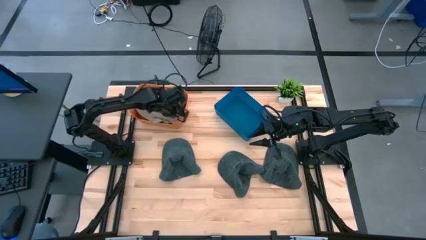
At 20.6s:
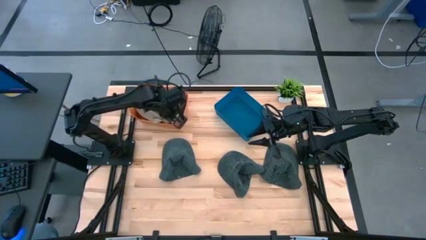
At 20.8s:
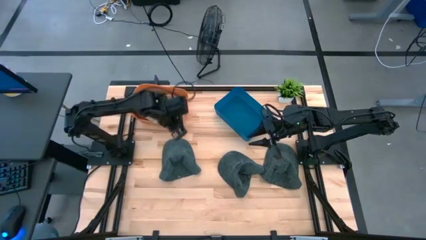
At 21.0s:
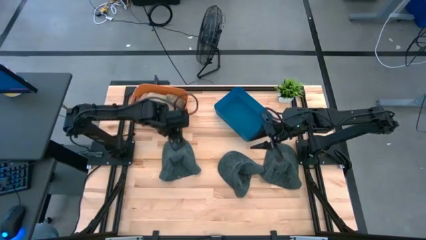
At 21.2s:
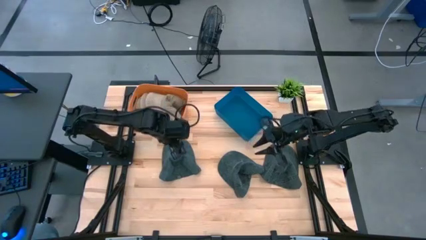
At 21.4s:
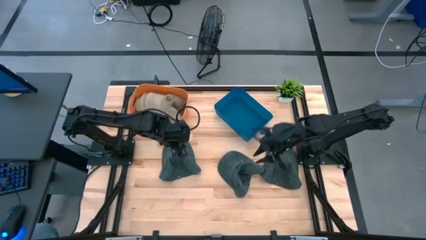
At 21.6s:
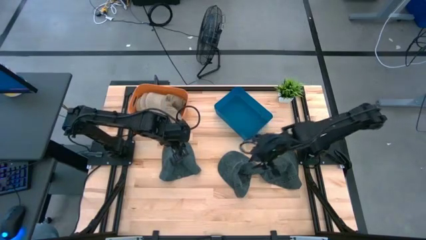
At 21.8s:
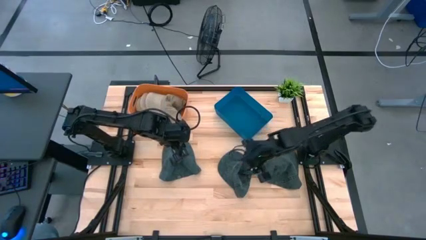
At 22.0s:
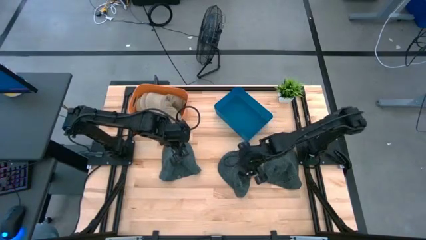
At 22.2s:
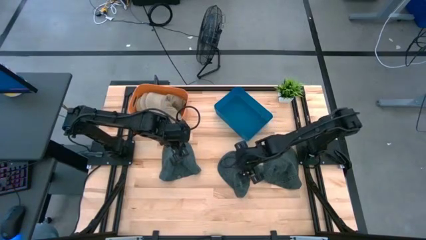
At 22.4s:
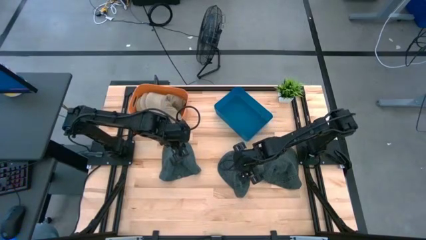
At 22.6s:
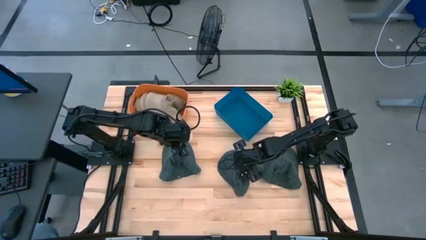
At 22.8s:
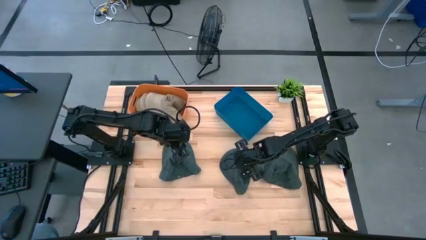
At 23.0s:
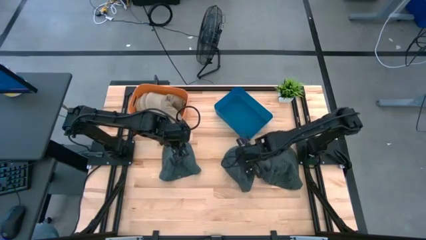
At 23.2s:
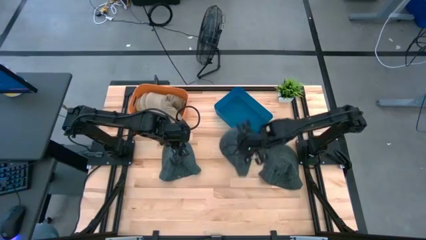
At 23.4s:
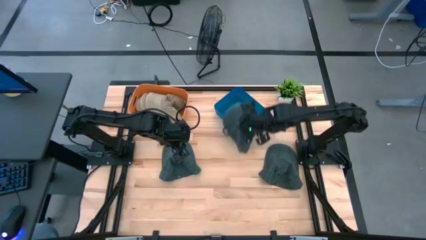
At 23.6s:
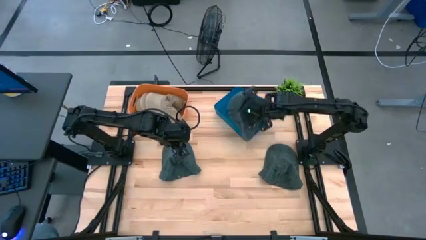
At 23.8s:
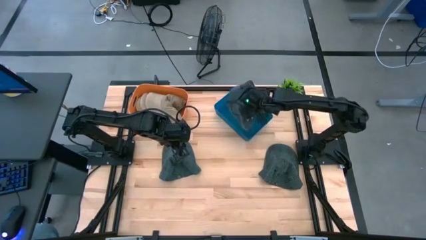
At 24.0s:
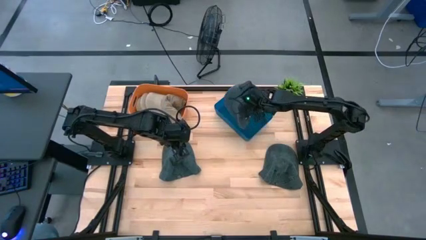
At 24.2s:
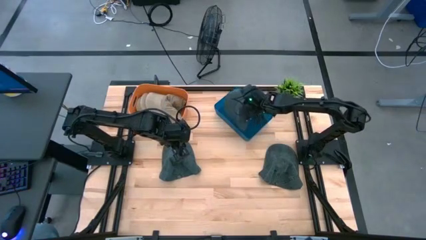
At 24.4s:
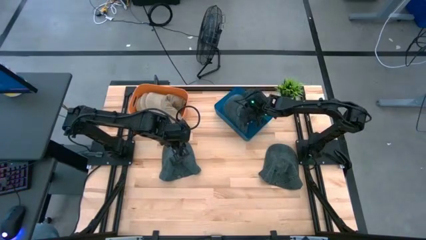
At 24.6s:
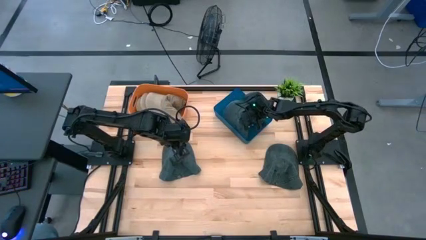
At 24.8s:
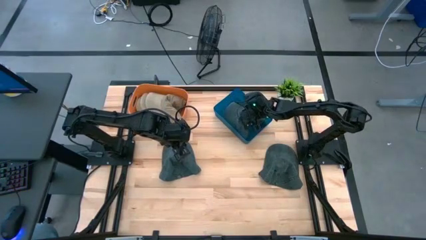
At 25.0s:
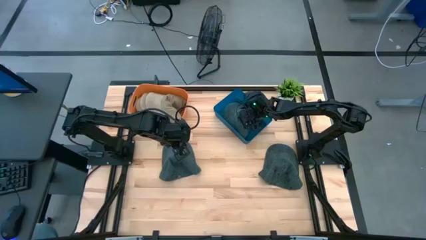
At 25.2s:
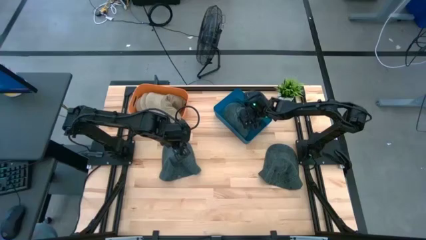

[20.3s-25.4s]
Task: Pick & Place hat
Put the middle gray cap into the blue bin

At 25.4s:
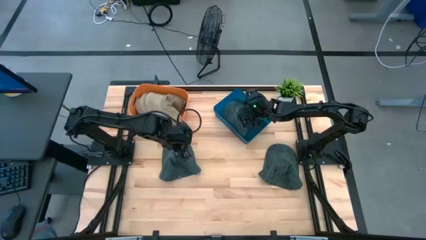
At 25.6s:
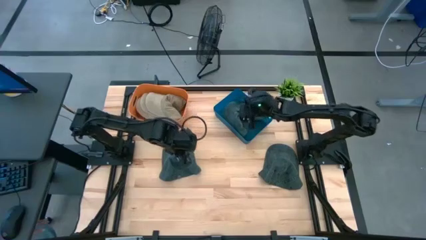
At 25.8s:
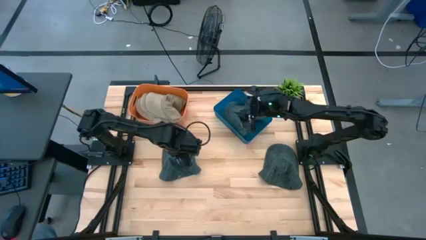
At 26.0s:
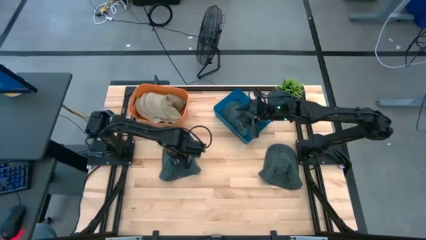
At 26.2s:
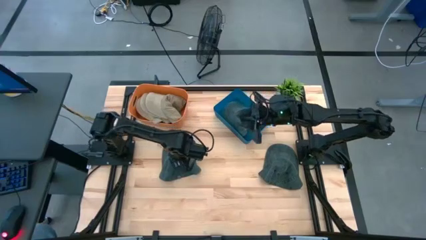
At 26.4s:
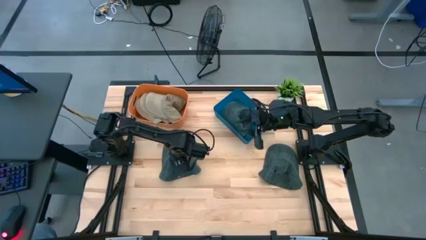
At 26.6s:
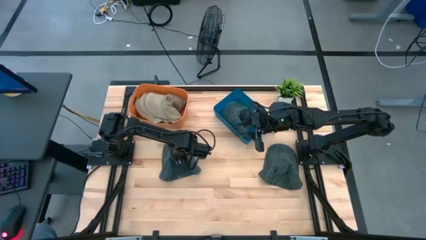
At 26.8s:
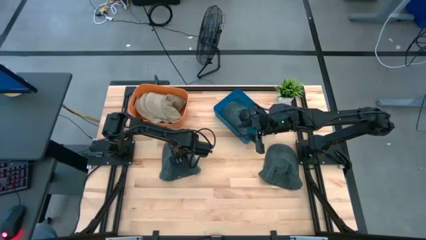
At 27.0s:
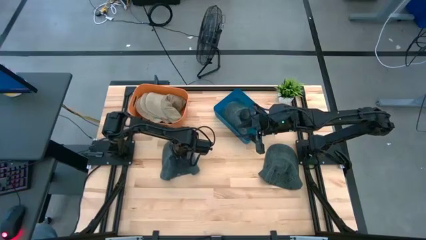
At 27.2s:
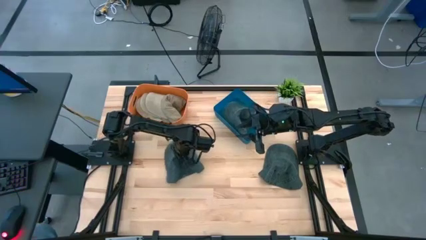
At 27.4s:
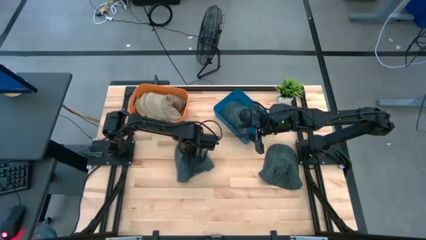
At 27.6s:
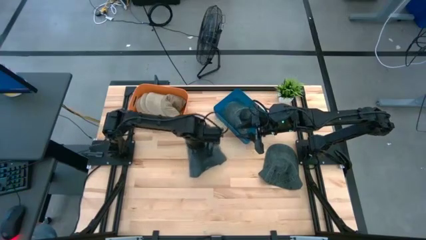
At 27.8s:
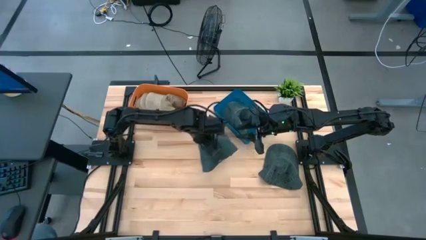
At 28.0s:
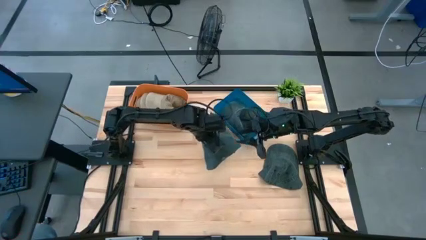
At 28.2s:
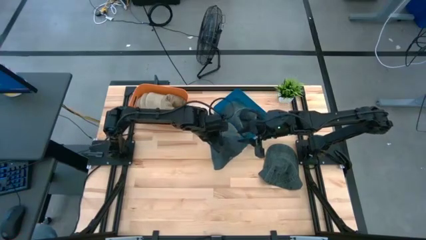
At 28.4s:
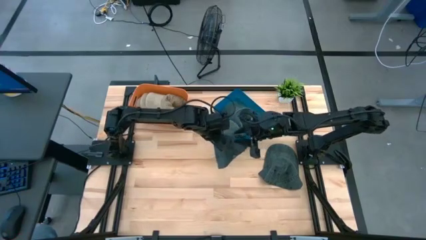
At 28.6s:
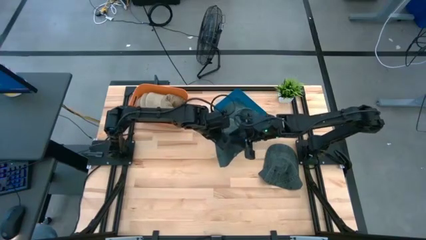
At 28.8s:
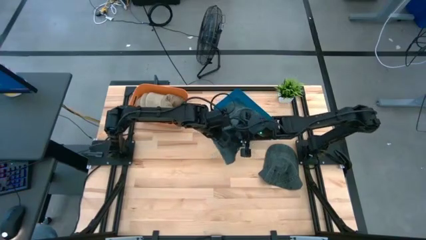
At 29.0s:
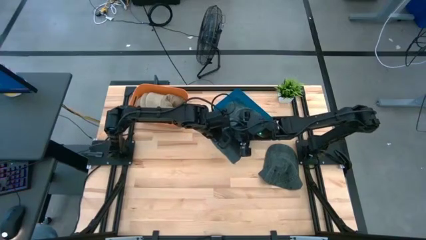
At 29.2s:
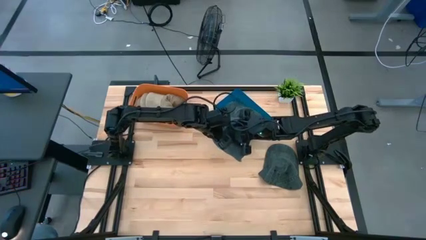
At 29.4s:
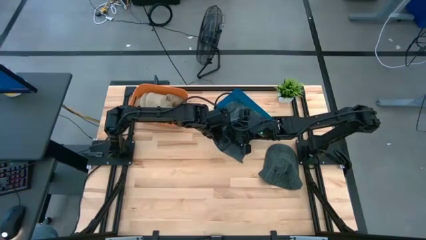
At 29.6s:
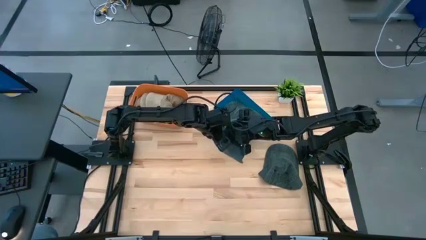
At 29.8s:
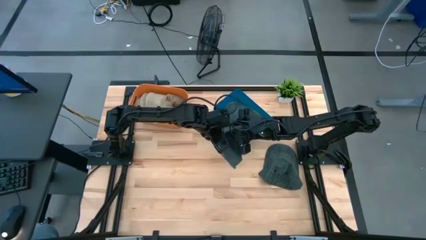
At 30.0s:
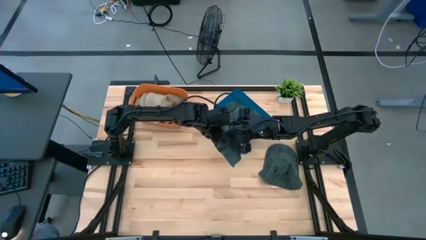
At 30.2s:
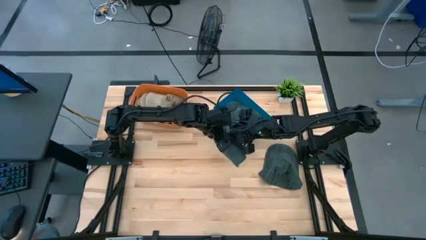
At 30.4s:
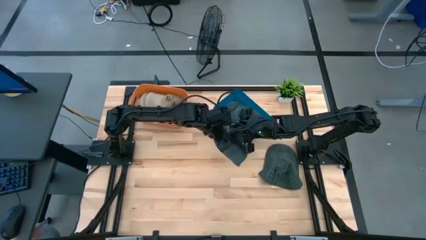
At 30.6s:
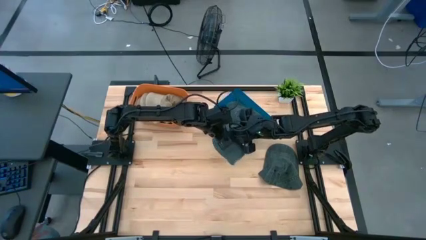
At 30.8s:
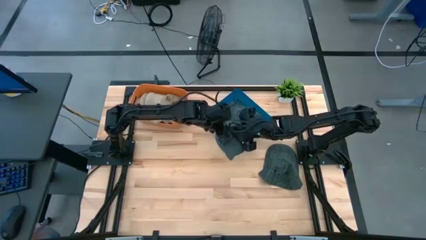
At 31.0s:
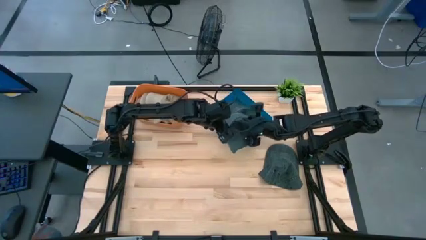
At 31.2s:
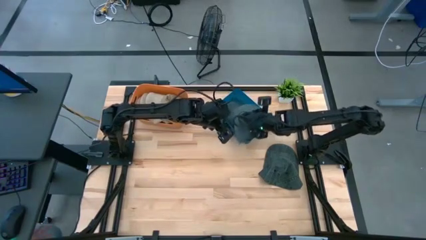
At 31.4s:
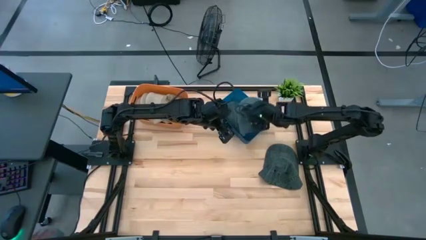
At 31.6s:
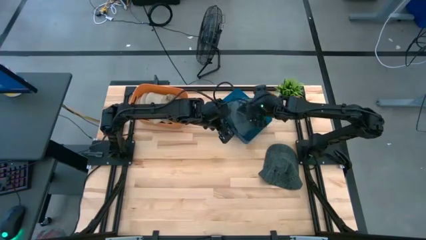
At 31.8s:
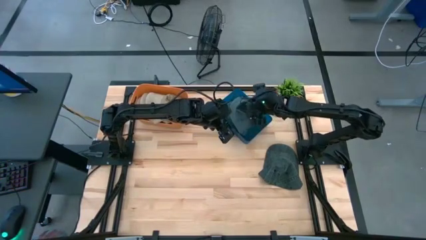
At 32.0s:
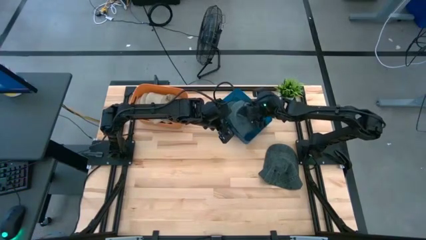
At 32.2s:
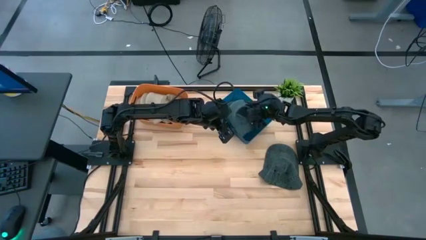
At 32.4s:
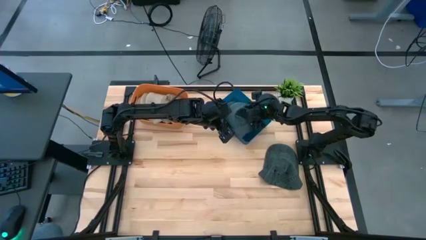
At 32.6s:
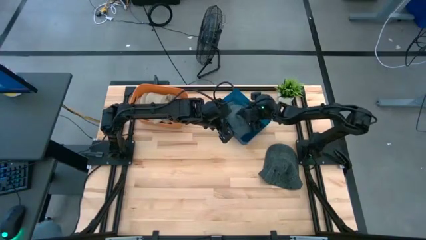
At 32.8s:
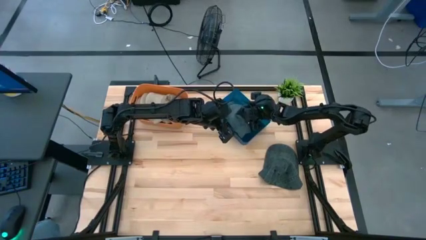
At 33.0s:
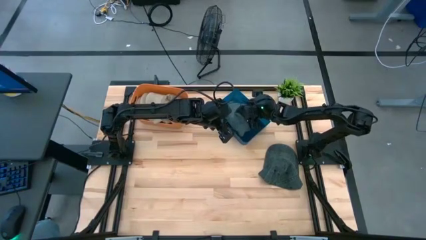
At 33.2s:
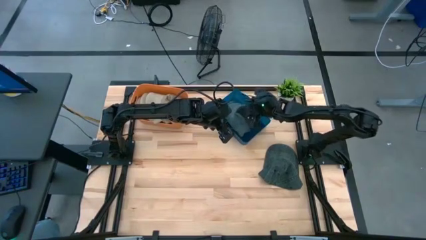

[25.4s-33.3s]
Put the left gray cap into the blue bin

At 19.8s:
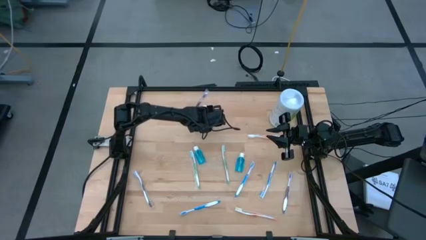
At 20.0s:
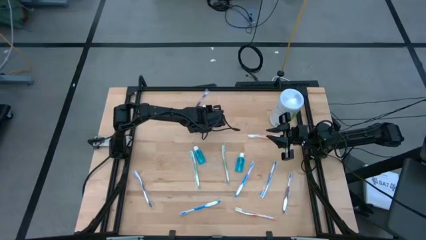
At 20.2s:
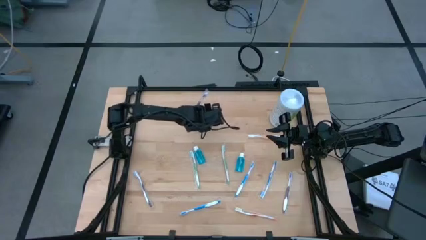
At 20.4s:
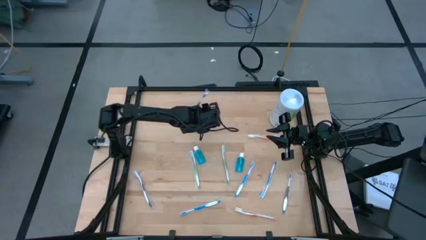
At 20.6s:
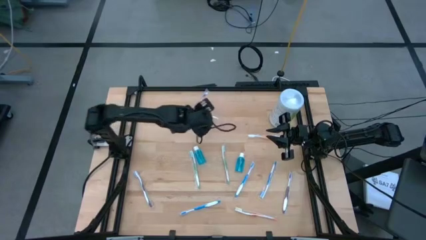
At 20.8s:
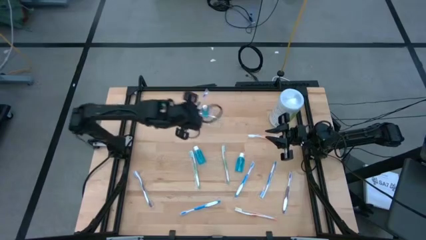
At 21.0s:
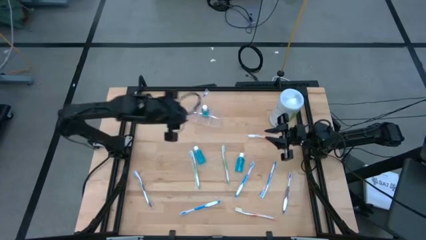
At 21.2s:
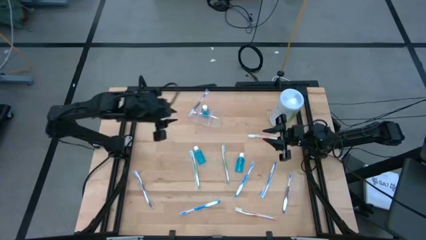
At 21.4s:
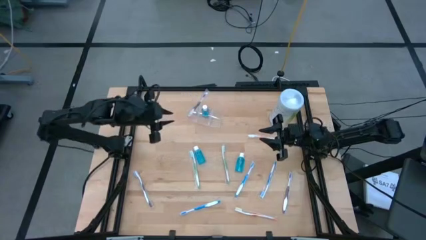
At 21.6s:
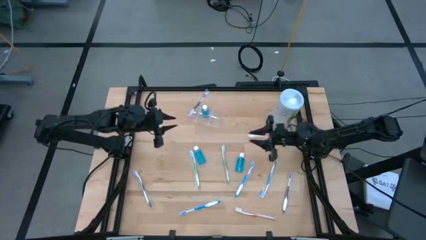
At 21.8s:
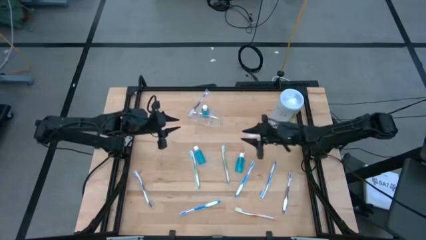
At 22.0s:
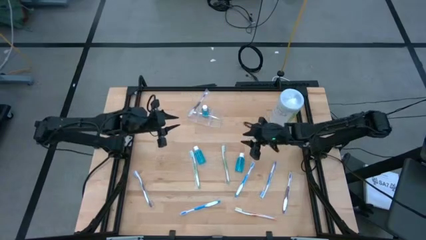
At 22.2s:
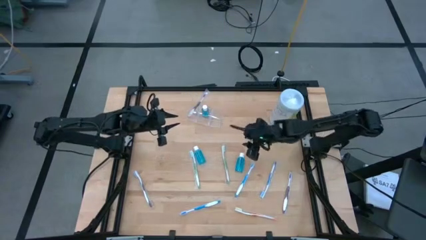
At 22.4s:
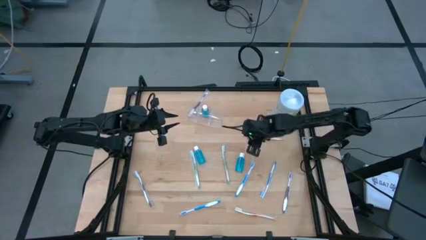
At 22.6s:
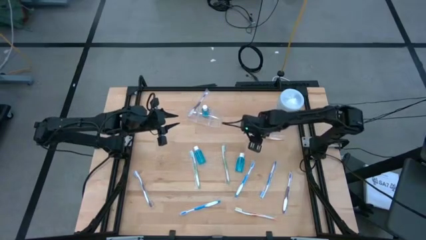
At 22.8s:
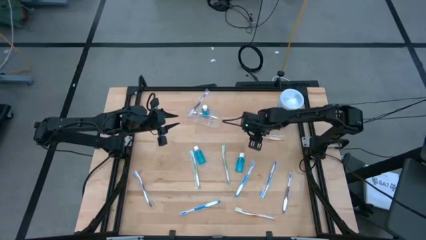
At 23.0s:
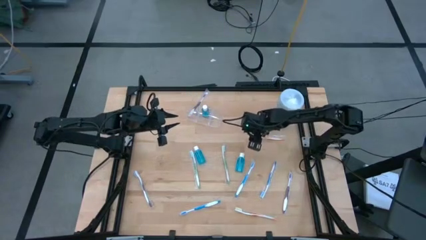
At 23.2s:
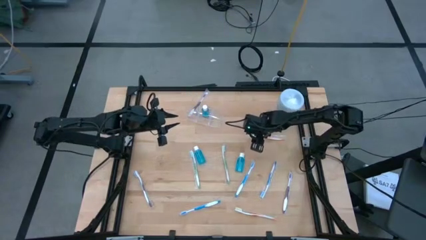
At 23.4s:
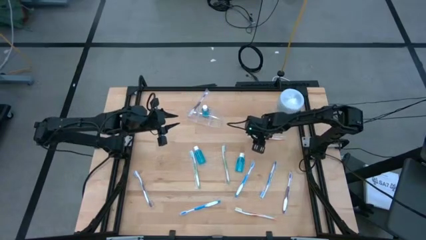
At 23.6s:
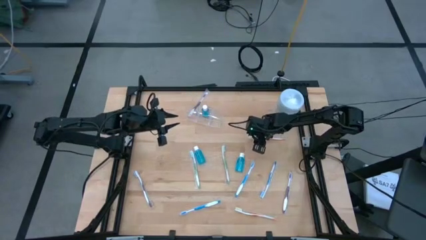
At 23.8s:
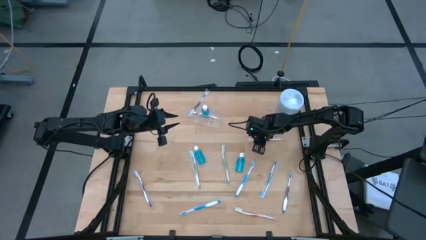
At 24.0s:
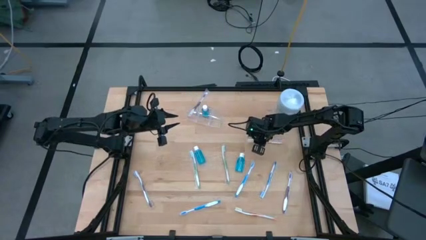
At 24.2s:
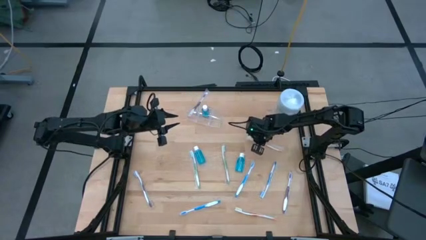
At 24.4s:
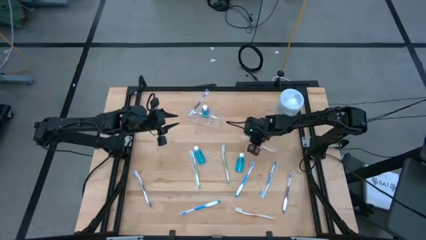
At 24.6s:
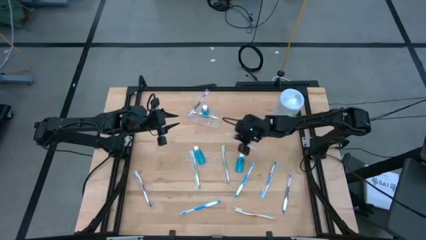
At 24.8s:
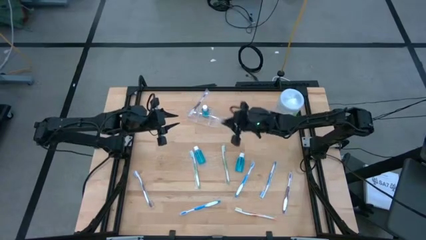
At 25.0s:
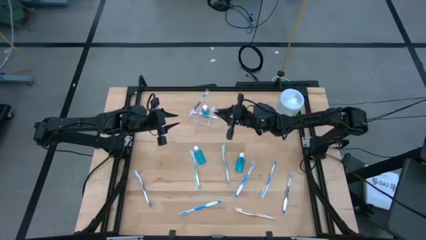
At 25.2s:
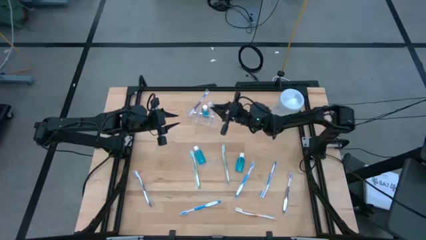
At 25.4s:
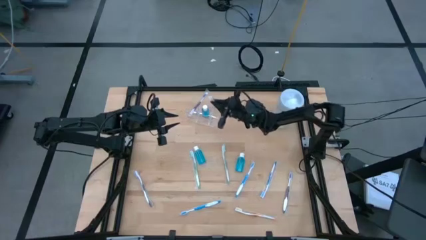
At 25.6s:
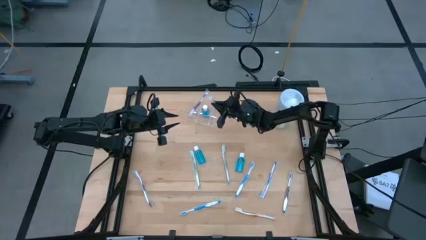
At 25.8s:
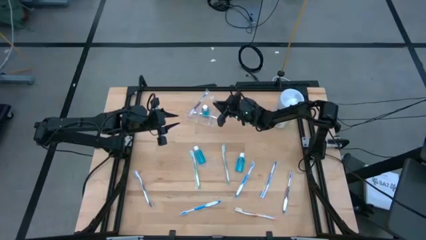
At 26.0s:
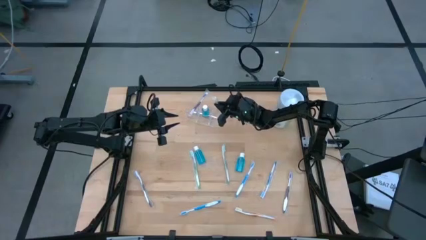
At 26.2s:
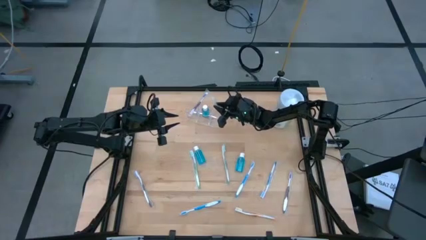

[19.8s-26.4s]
Task: Pick & Place toothbrushing station
Put the top orange toothbrush into the right section of the organizer
